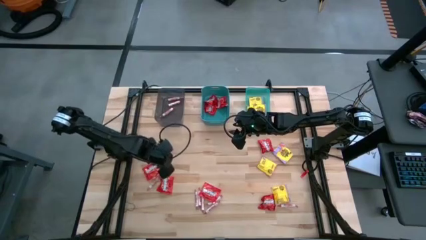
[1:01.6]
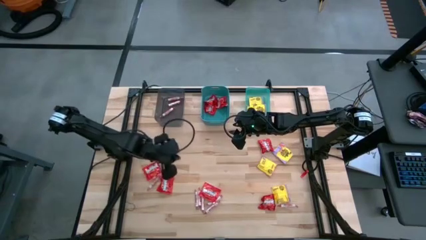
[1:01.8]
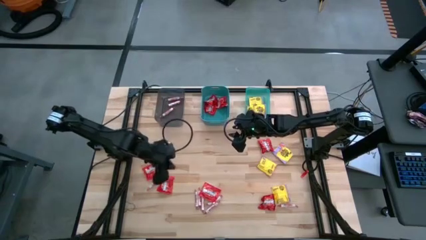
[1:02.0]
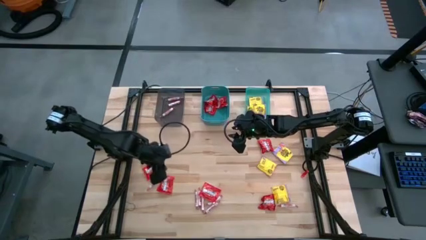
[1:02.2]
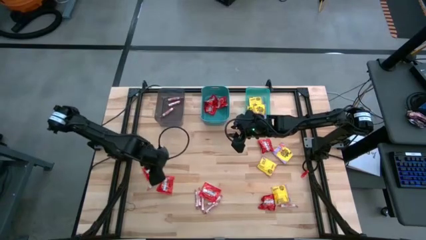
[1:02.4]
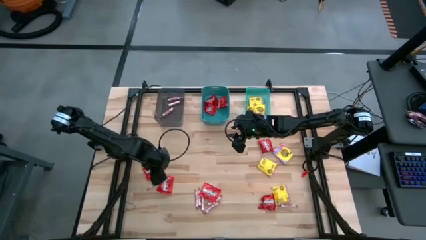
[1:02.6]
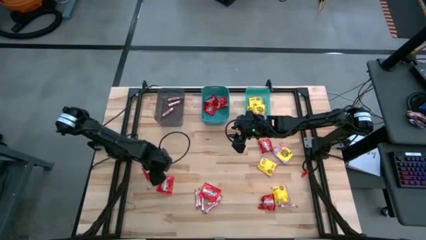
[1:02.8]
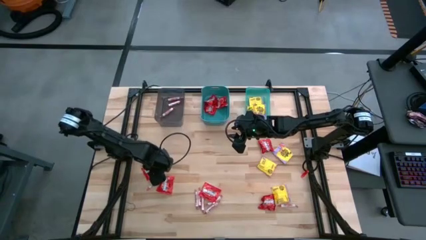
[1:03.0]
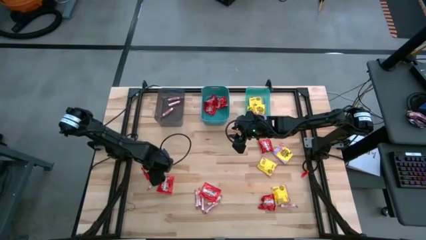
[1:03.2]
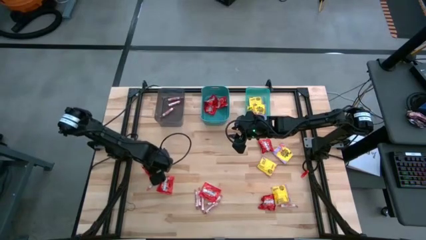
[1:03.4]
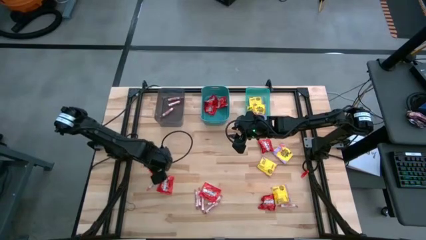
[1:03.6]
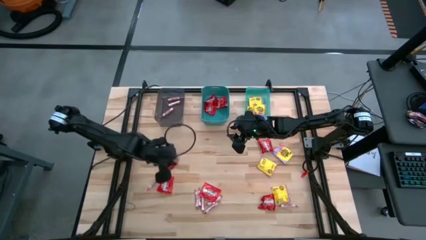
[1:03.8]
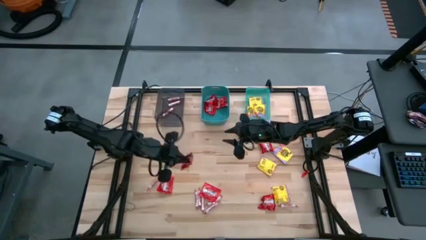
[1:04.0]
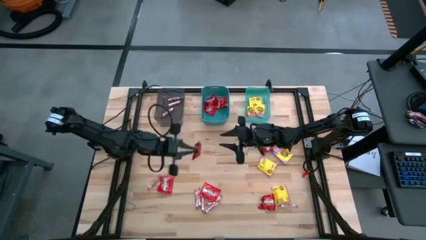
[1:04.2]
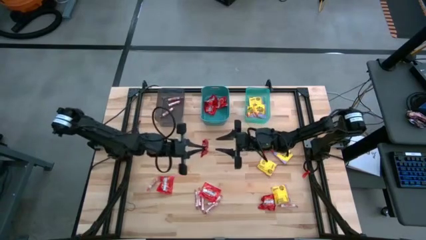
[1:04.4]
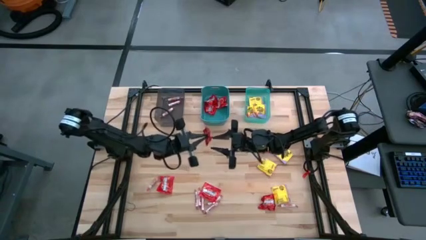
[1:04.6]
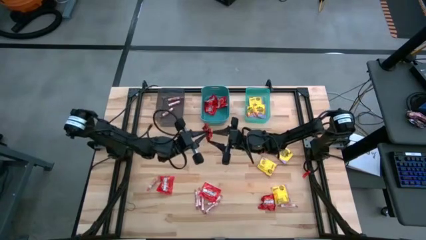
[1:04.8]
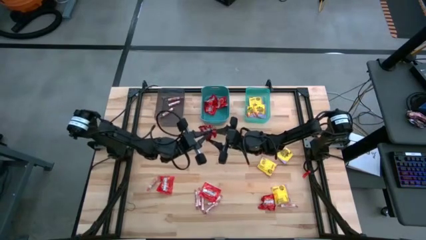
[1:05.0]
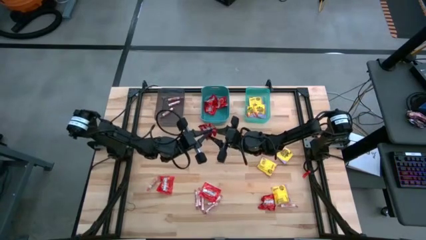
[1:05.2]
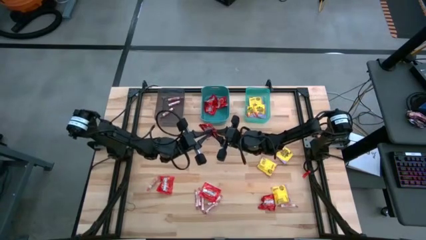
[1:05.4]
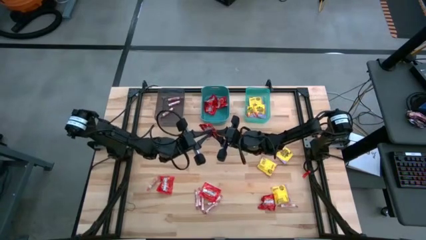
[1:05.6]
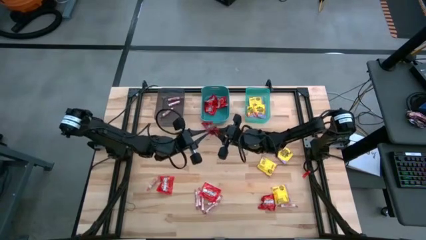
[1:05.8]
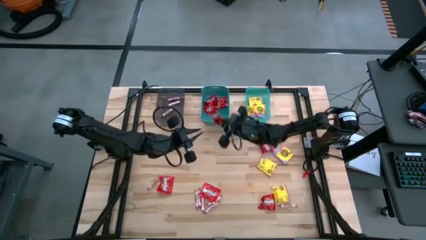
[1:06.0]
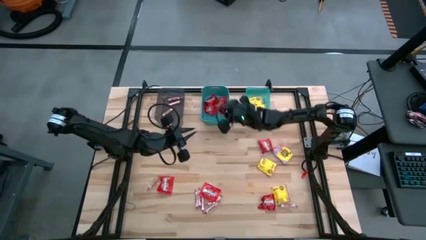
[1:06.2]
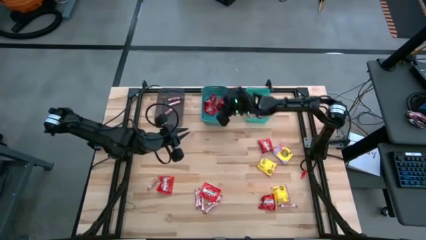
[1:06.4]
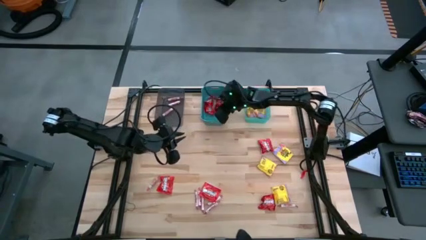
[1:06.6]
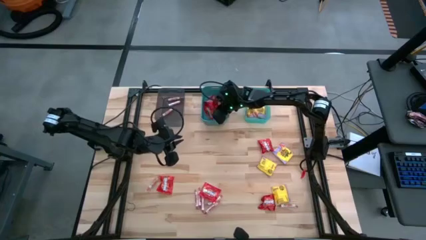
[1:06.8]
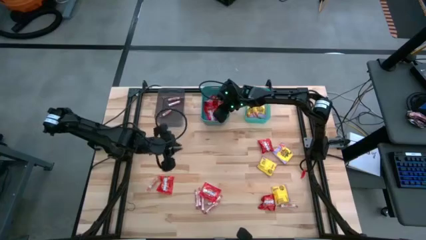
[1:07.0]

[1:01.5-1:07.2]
Task: Sort candy
Put the middle left red candy on the dark green bin

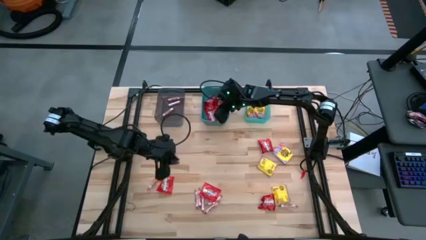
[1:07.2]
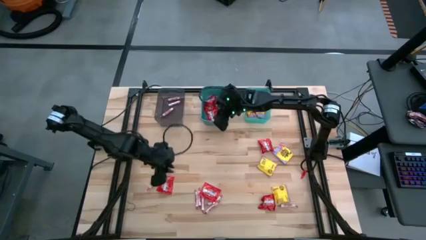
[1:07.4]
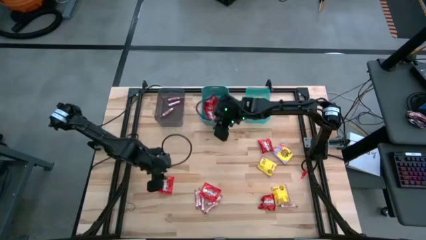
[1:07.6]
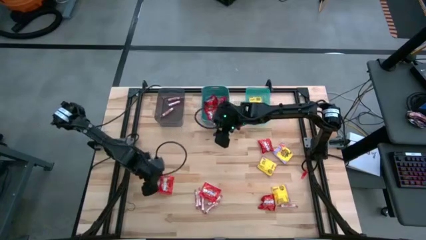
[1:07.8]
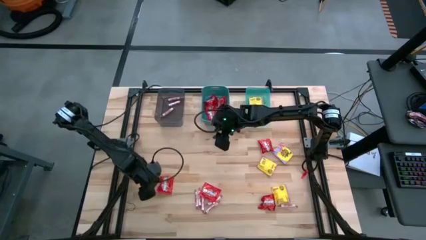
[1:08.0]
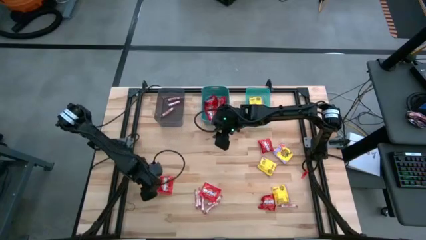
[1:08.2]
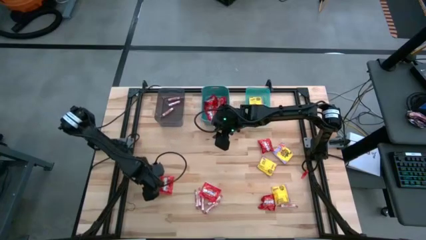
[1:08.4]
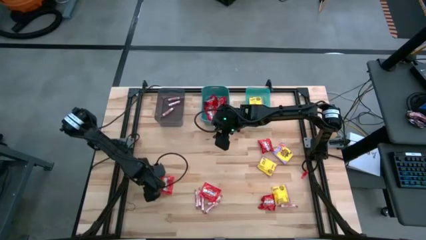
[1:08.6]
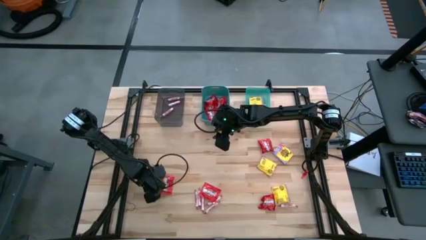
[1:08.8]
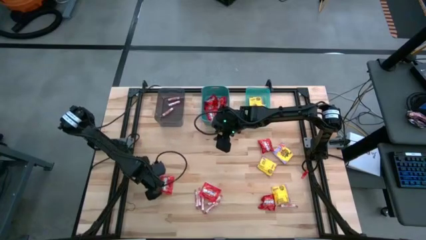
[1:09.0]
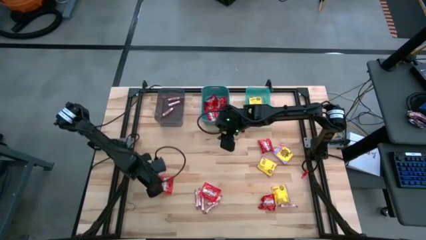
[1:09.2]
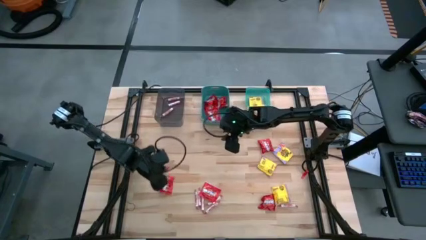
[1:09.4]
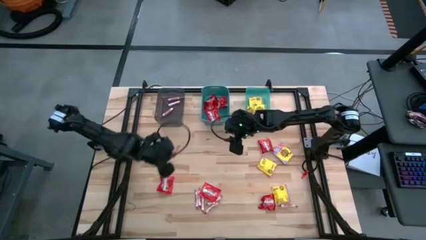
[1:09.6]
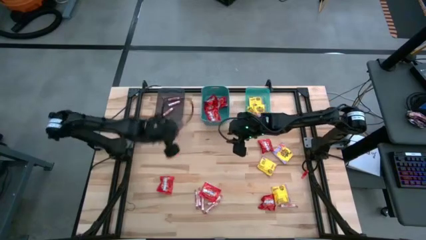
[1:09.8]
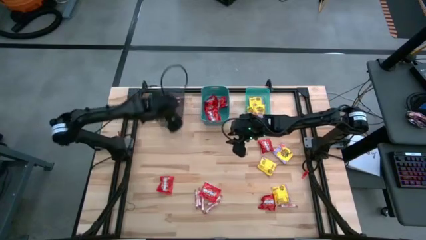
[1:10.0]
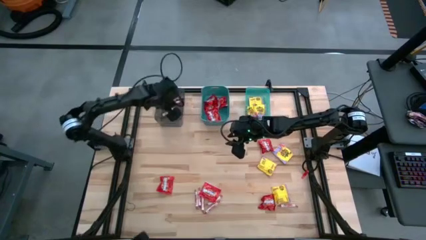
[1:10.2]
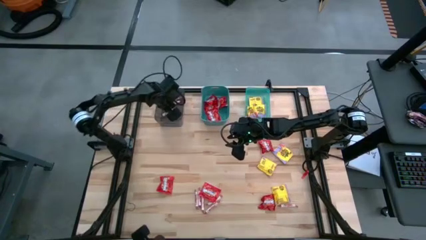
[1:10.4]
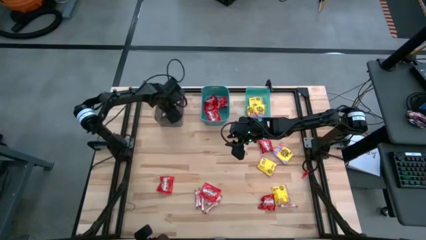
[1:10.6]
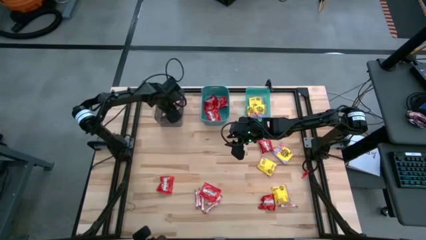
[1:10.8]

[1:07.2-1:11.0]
Put the white candy on the black bin

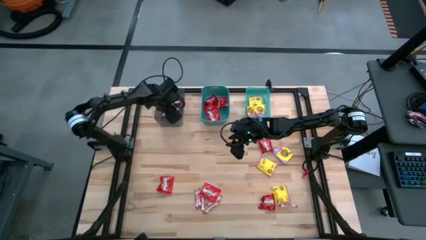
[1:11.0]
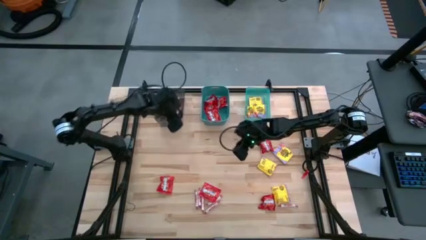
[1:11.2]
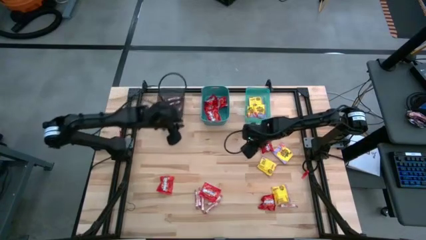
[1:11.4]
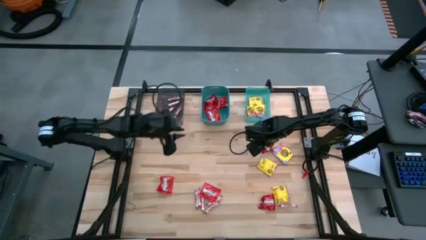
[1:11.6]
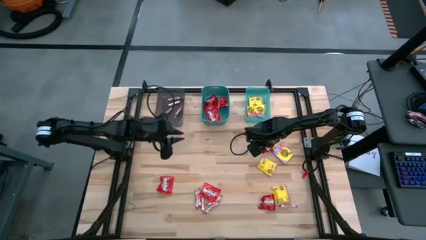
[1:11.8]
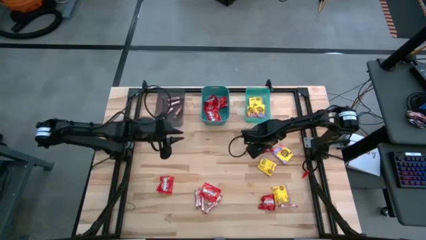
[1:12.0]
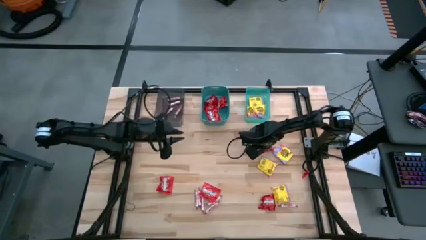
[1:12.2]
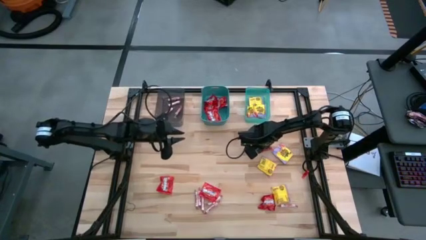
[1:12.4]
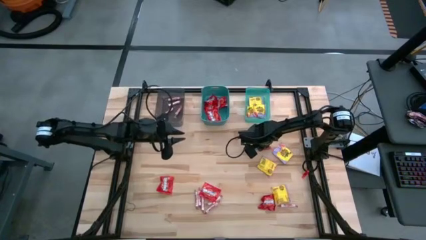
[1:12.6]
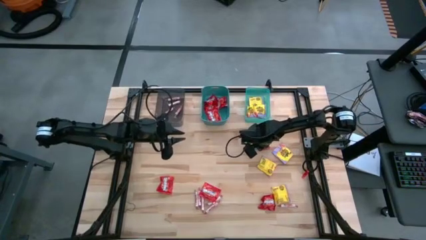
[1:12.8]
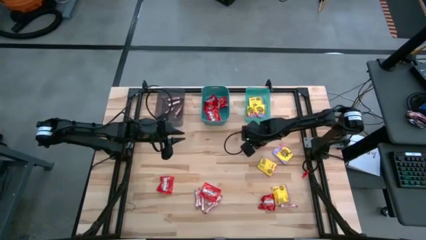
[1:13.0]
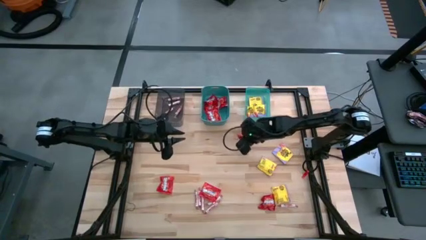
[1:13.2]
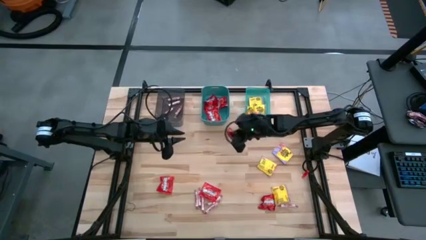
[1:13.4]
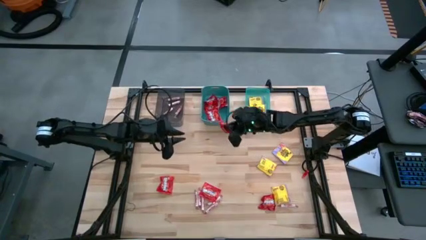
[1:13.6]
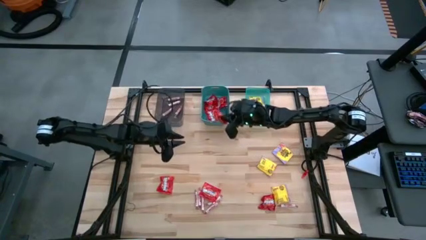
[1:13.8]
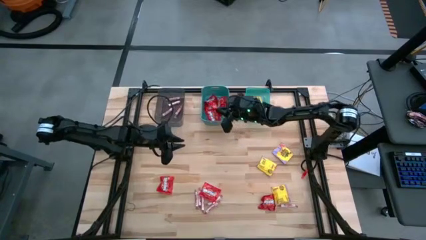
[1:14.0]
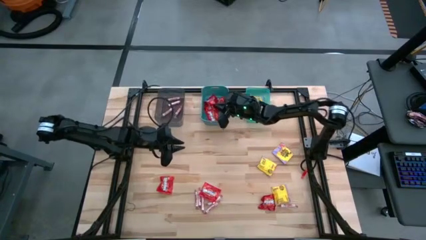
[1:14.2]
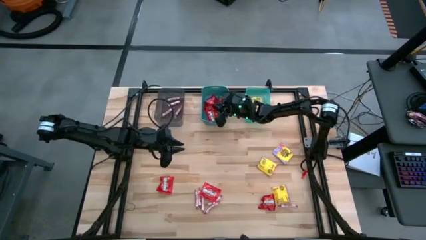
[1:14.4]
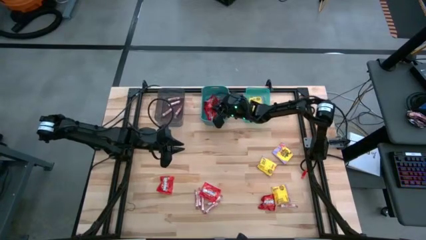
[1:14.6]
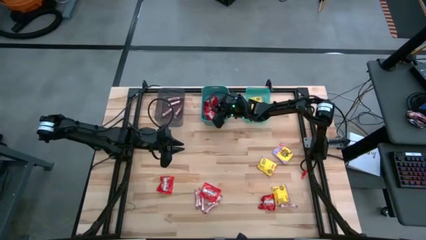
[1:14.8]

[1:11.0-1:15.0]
Put the top right red candy on the dark green bin

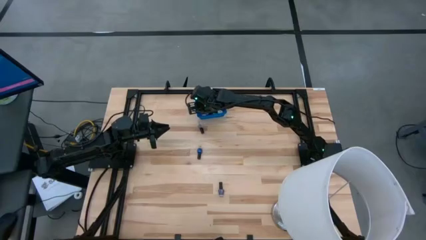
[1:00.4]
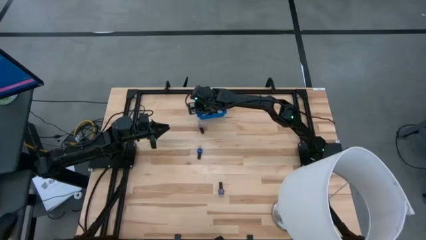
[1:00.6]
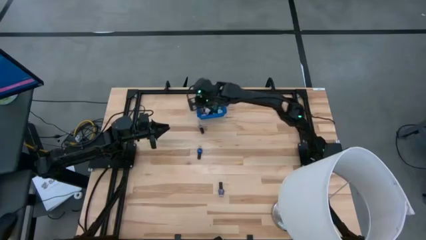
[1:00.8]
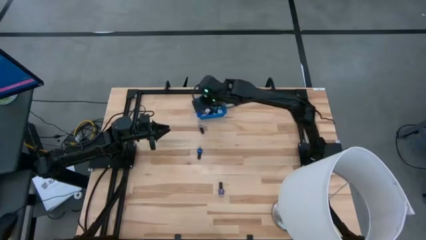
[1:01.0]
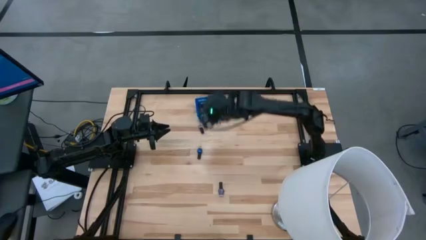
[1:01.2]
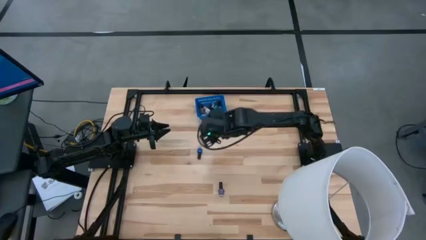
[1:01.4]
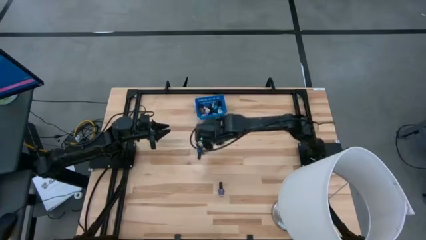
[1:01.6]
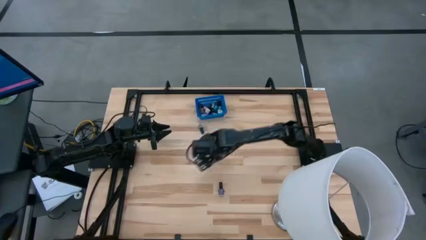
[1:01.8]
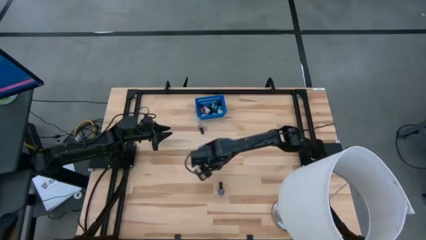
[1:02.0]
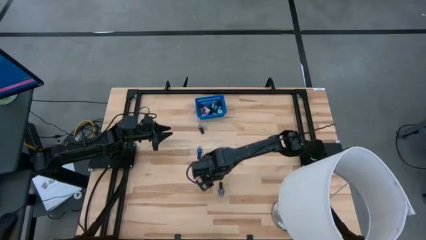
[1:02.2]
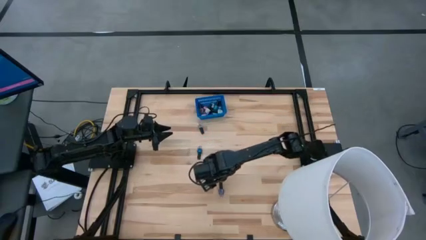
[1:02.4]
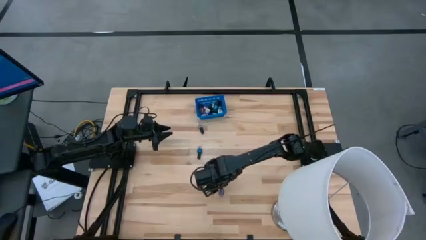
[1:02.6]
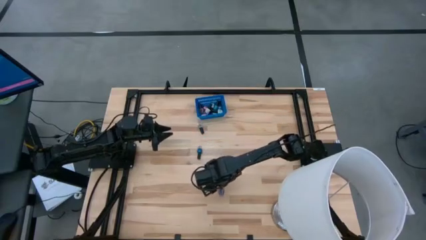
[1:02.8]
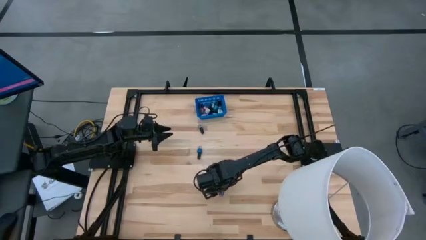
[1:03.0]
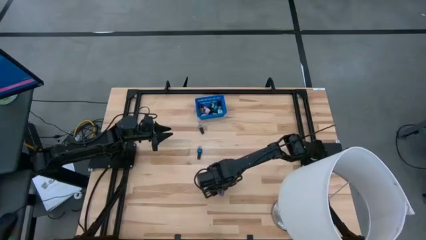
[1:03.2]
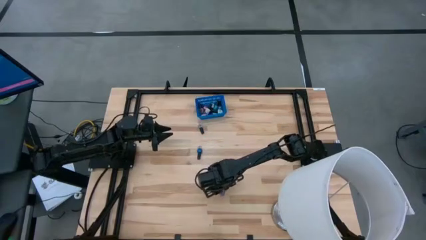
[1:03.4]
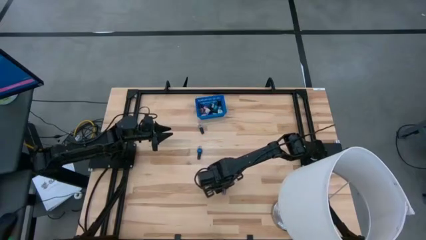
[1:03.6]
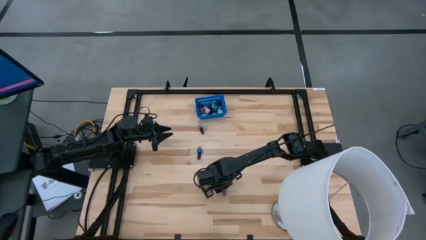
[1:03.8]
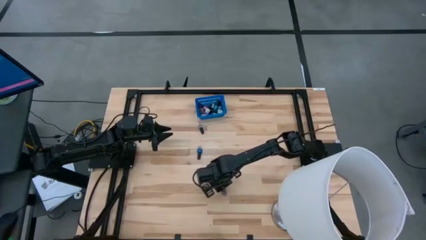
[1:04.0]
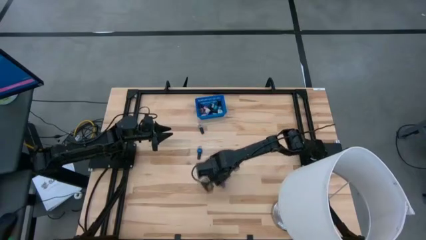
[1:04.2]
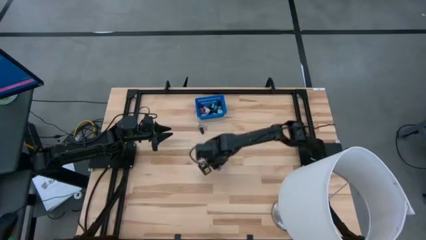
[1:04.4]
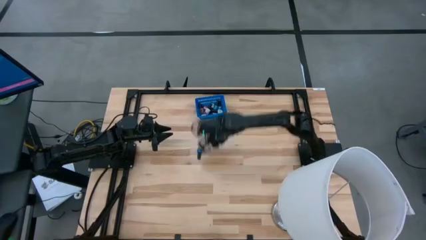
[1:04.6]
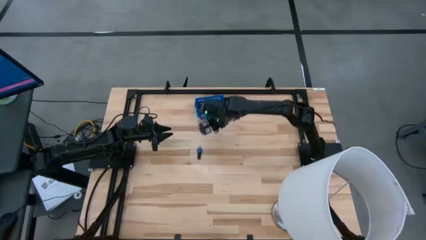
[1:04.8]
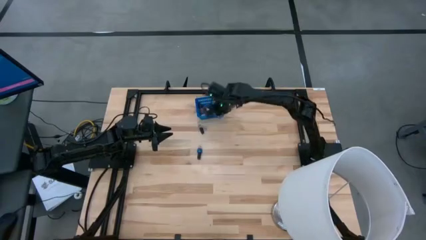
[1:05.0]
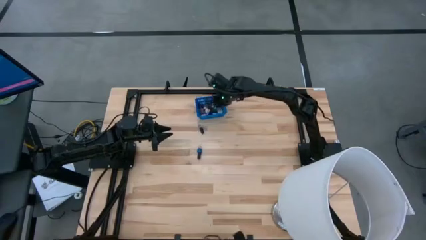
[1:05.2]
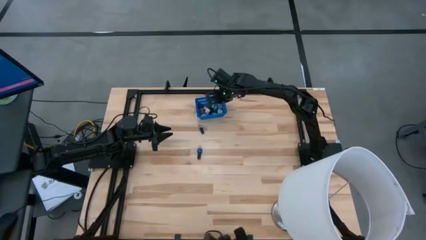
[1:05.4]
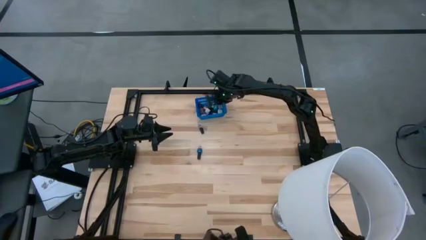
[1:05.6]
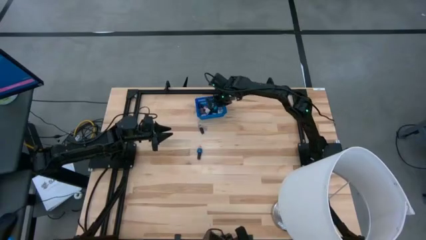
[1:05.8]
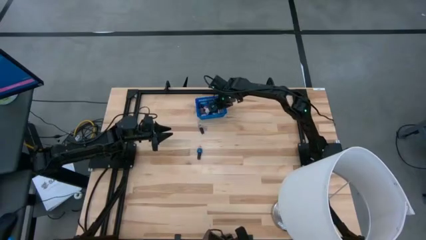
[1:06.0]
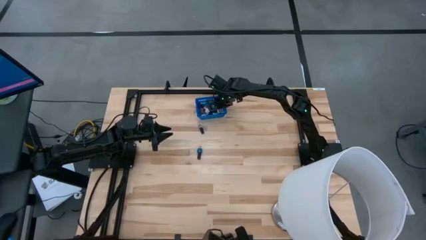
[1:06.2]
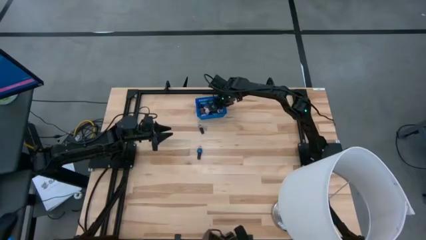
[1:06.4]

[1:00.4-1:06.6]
Task: Pick & Place Nail Polish
Put the purple nail polish bottle into the blue basket
